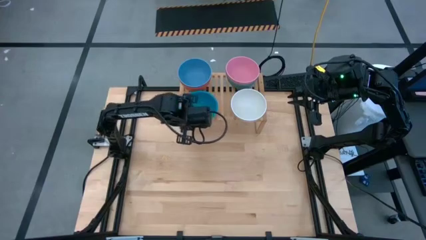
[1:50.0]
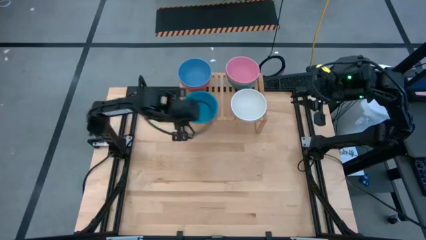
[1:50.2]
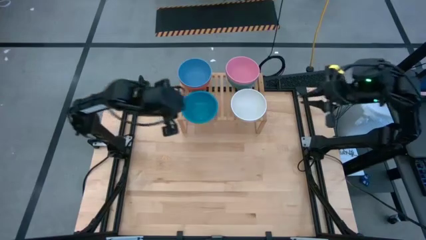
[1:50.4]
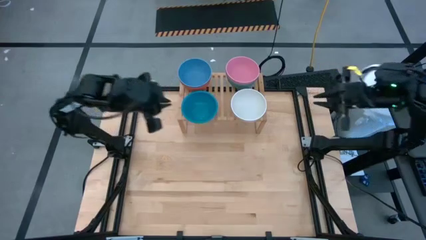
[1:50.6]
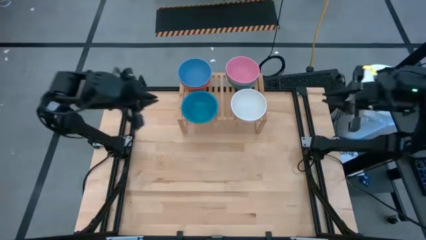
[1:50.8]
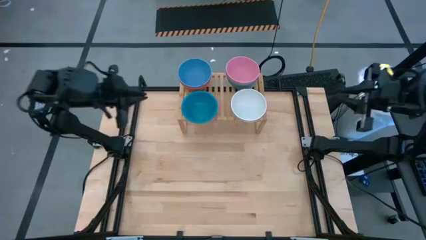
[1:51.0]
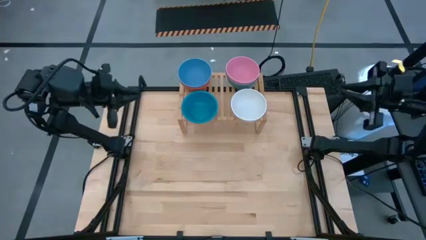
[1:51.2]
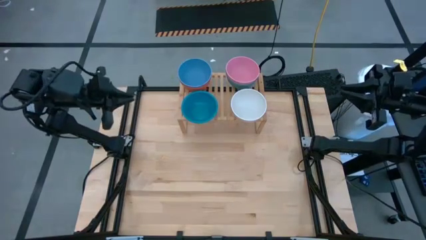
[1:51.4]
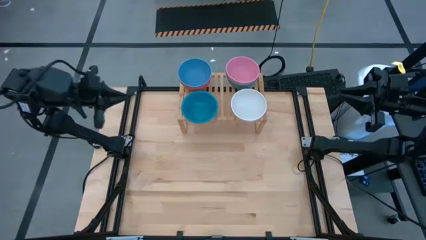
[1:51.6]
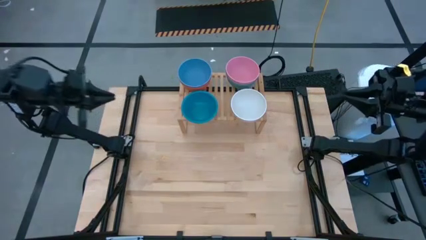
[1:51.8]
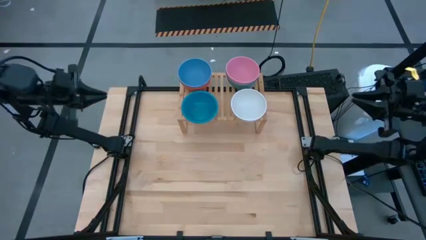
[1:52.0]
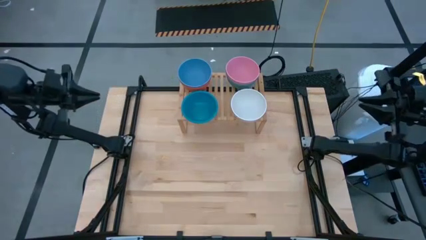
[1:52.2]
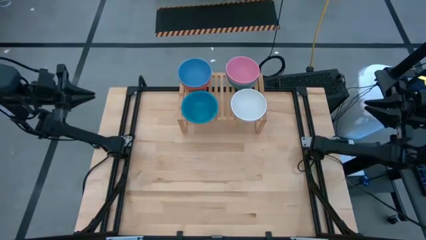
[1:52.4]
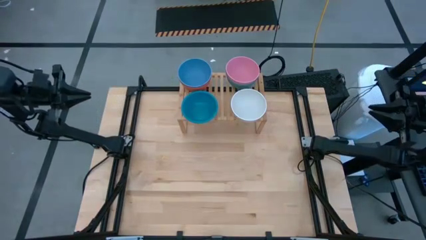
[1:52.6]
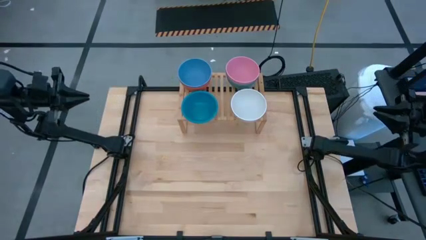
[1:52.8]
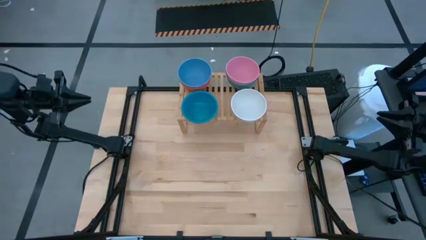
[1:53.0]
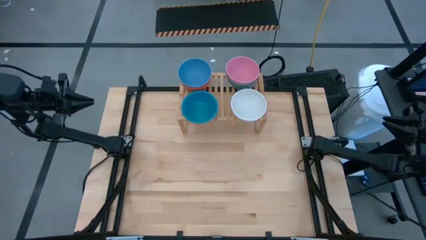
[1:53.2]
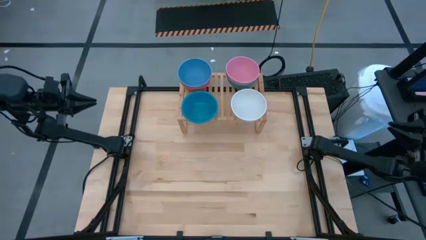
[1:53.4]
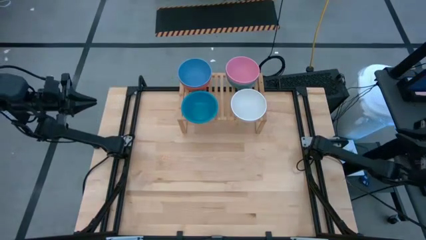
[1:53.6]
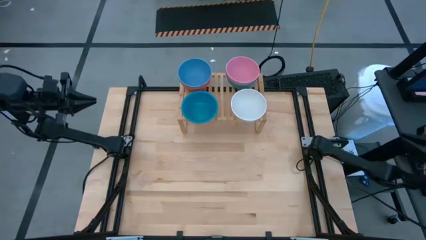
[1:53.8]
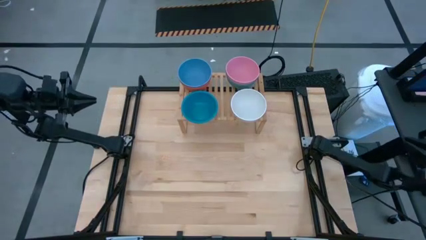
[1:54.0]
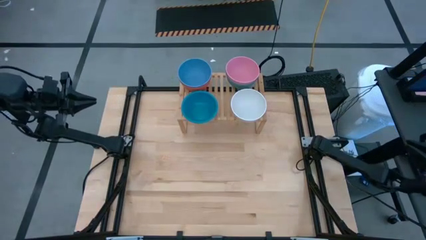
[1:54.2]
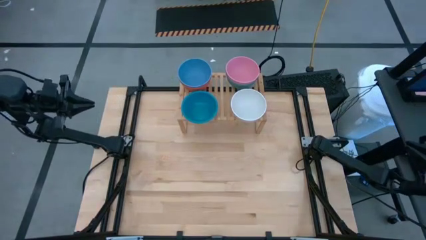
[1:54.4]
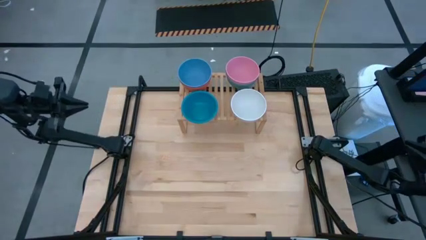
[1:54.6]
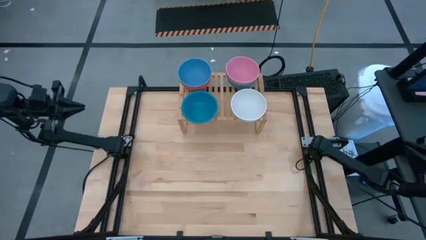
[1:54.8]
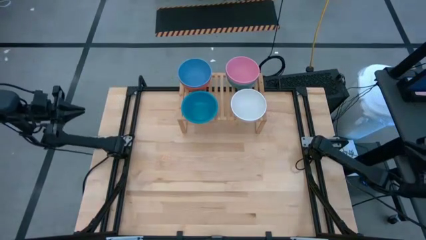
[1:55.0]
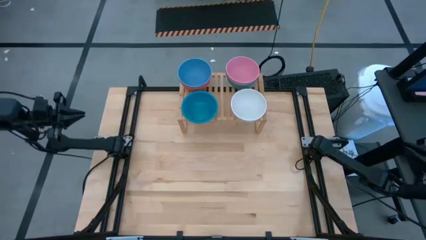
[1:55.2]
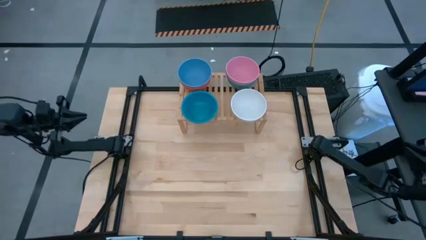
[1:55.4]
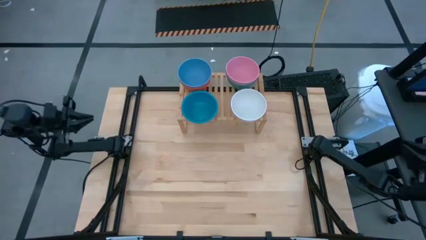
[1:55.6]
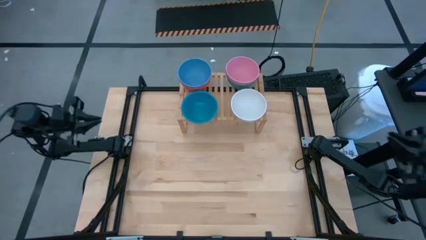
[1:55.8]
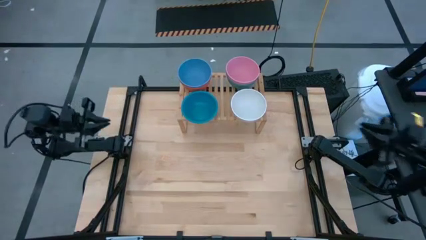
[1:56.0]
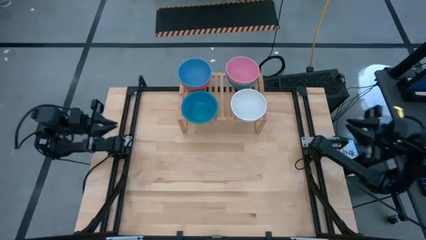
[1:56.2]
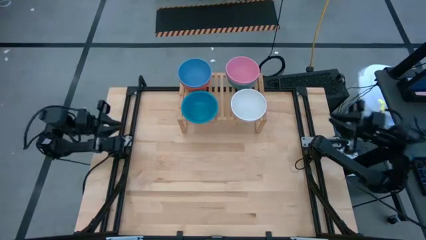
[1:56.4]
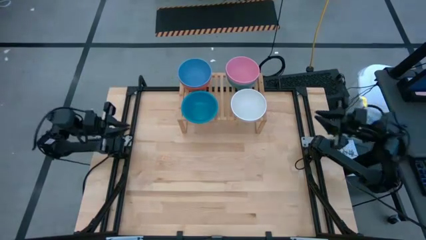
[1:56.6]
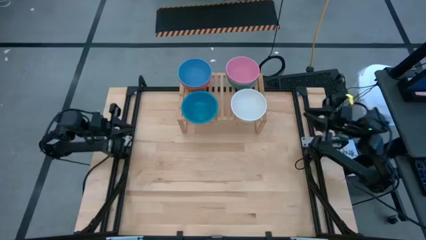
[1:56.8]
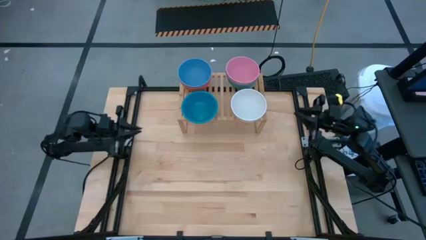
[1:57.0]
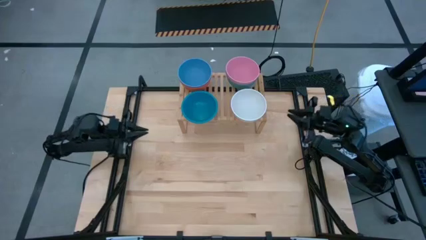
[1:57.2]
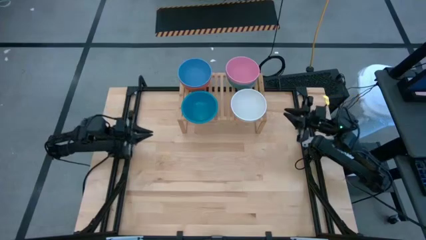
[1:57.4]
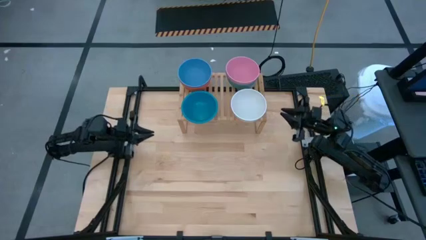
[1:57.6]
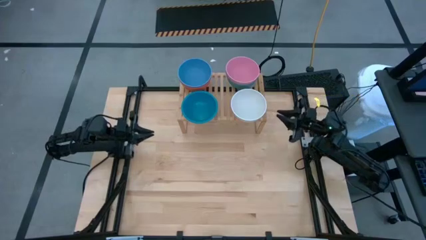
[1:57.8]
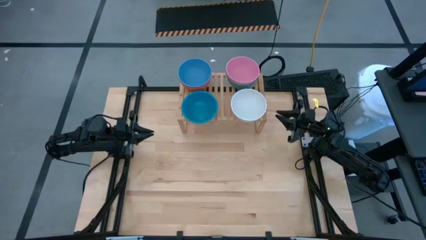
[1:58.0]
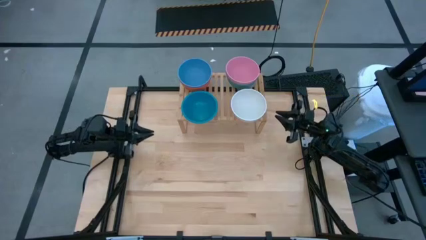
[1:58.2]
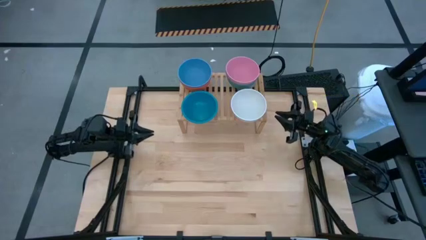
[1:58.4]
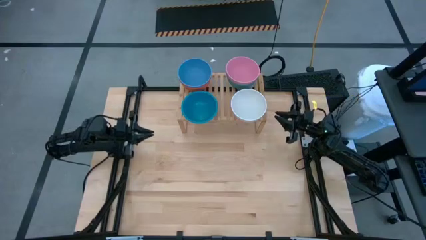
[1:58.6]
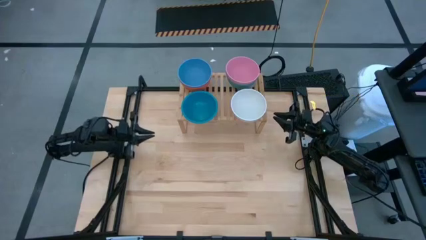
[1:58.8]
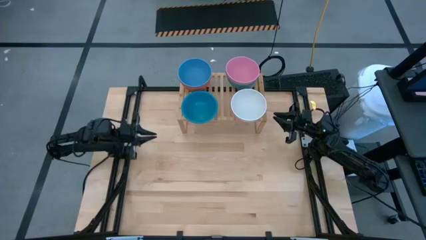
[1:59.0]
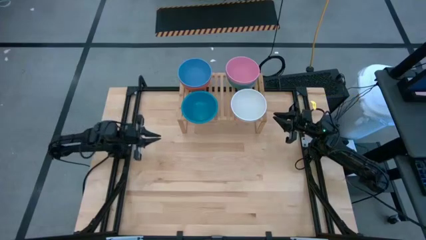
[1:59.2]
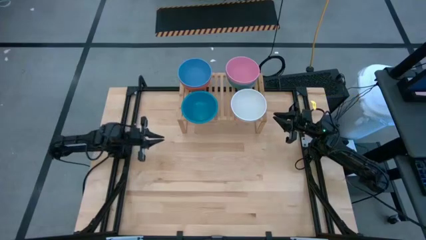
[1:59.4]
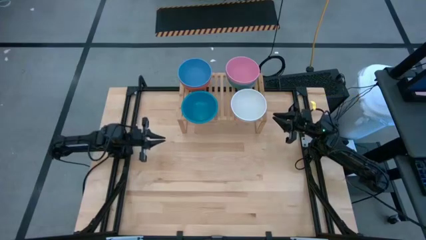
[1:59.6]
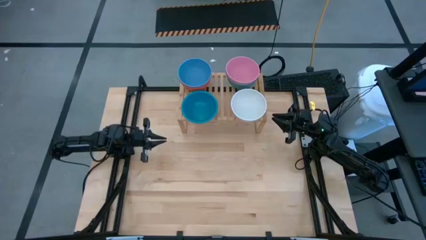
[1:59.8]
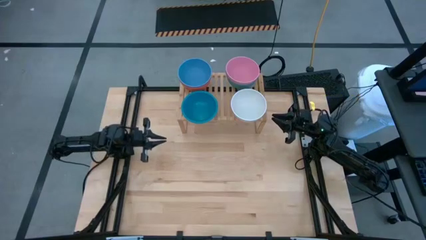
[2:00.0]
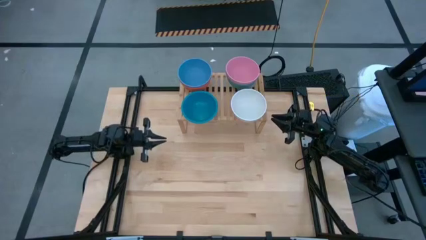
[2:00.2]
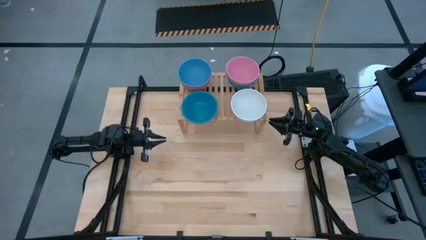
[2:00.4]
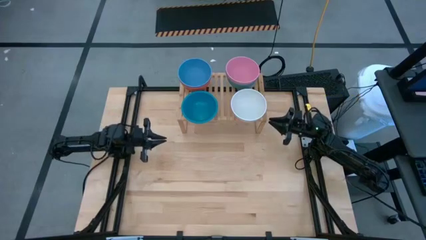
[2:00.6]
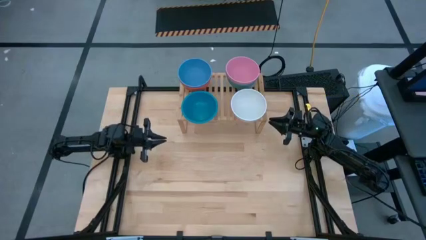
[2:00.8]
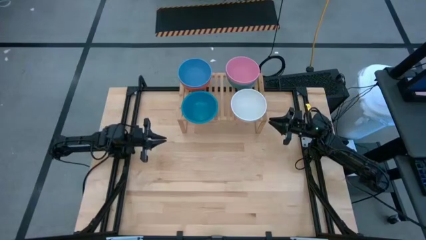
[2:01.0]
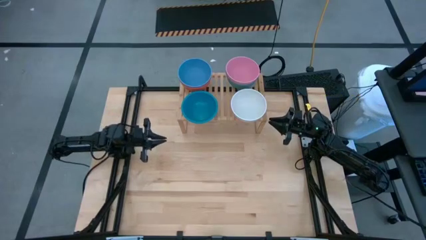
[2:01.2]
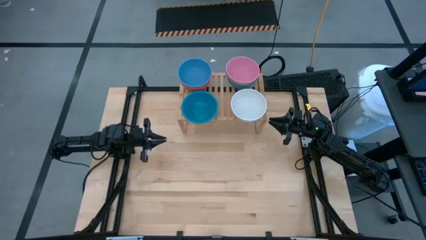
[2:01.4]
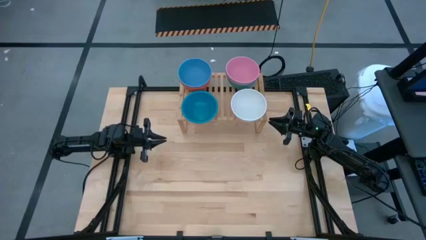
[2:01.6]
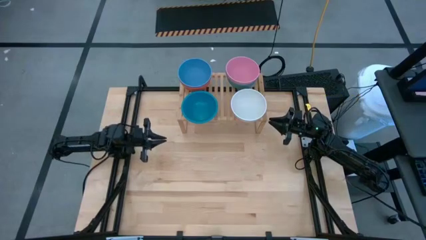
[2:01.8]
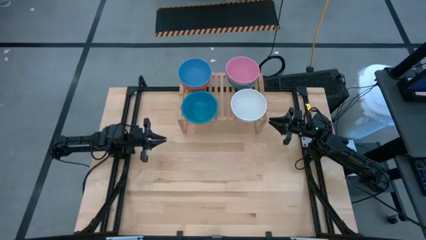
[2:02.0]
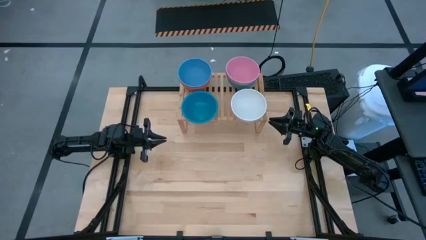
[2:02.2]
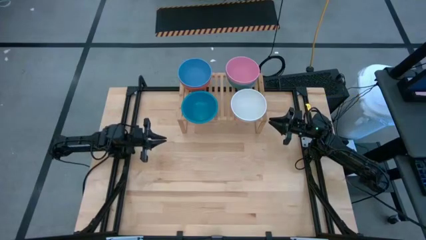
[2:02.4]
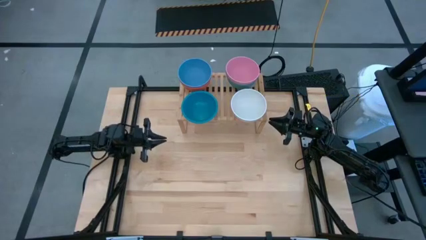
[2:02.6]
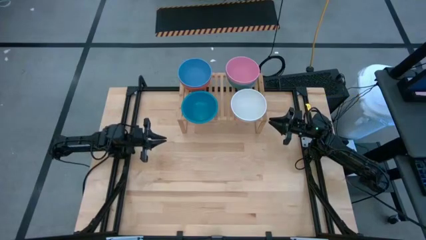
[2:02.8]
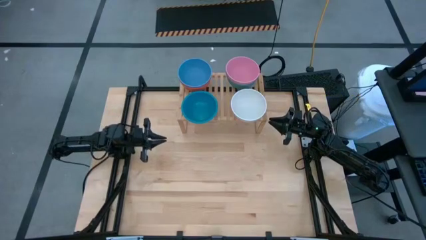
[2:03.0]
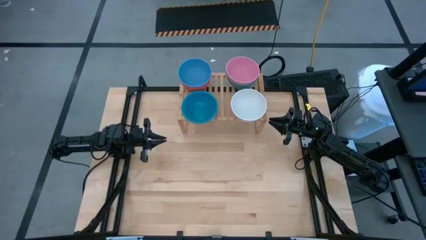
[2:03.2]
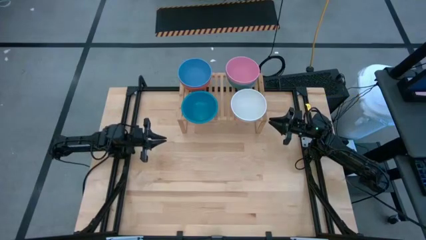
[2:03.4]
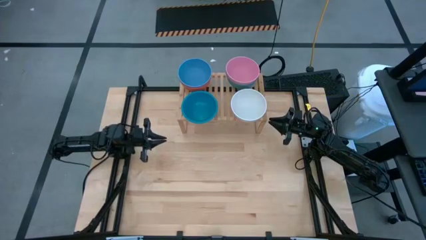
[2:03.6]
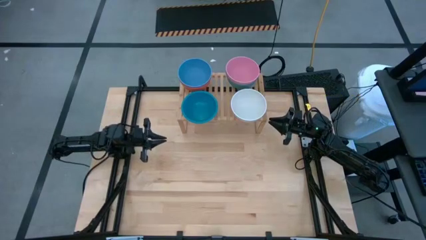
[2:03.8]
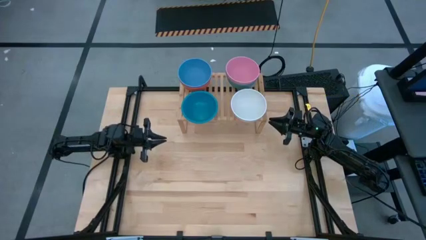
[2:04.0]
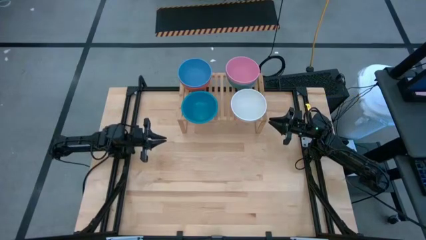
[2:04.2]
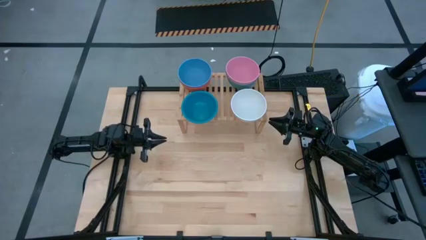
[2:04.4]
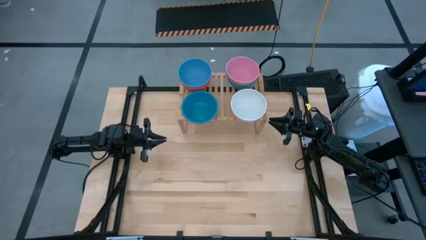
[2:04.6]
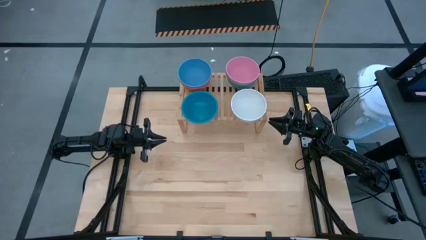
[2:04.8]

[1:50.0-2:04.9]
Task: Place and stack bowls onto a shelf
Return to Home Position
